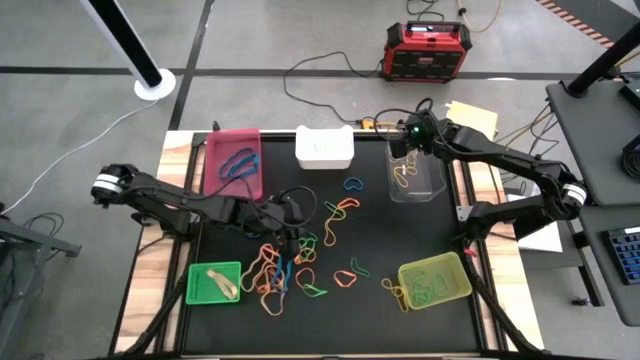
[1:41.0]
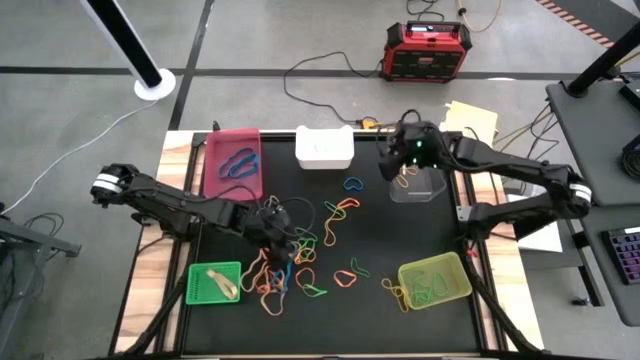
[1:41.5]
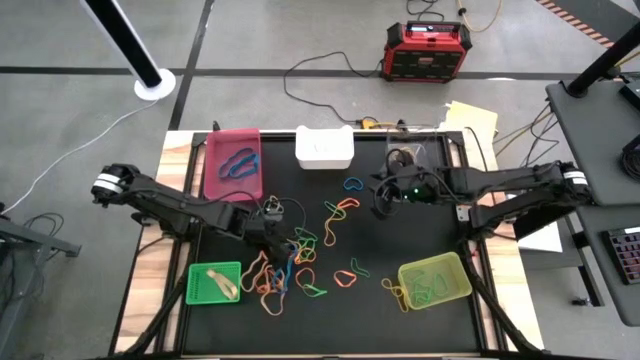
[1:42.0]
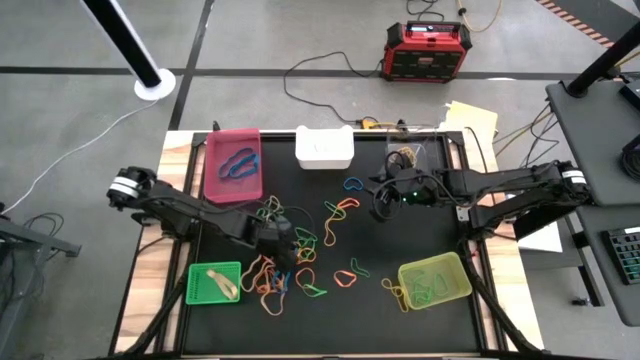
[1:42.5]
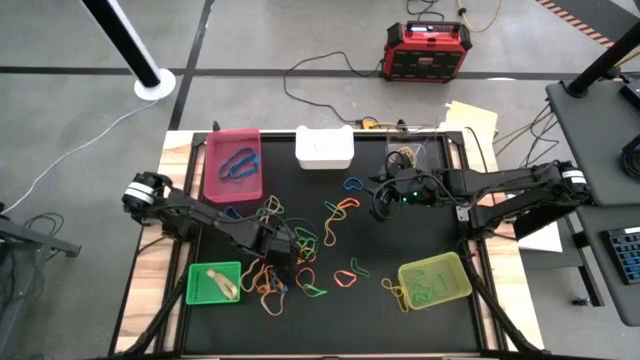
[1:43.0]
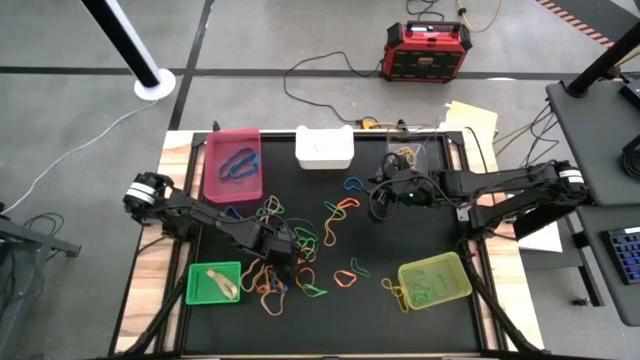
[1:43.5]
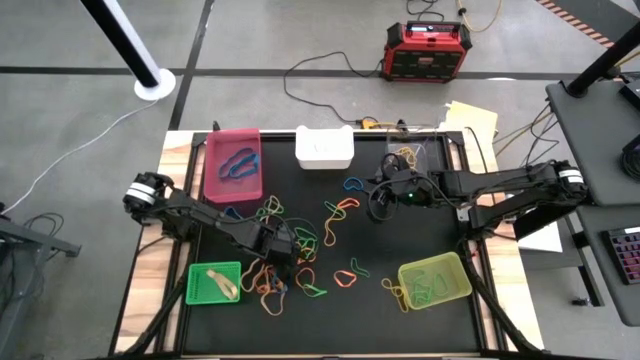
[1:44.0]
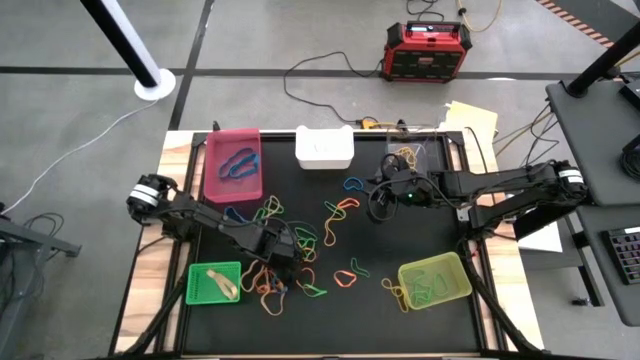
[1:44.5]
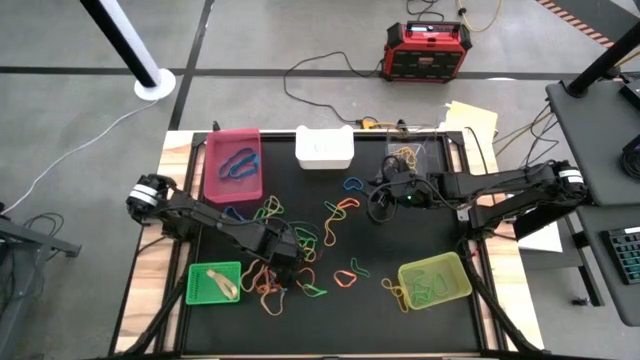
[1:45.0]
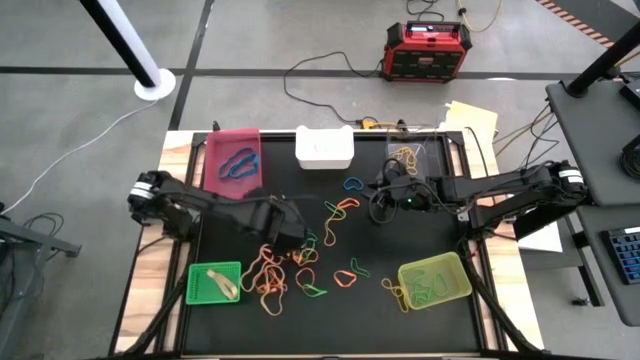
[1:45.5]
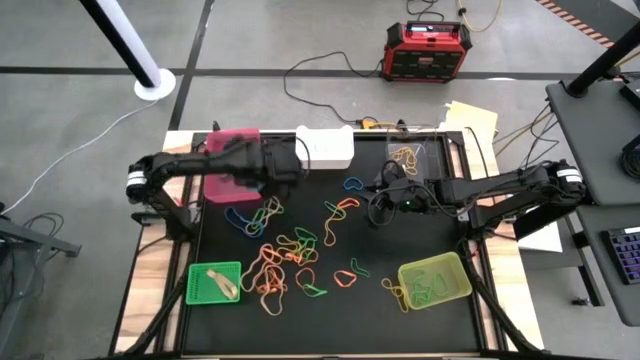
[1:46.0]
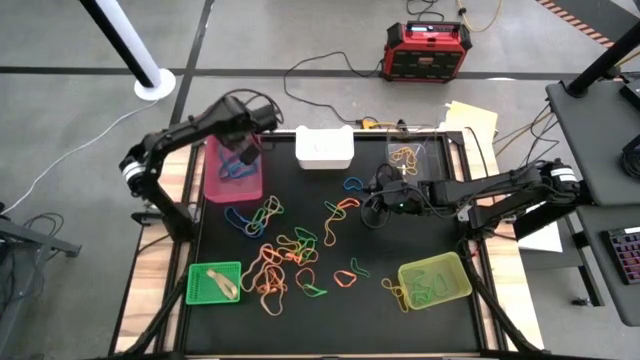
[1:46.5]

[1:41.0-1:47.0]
Task: Sort rubber bands into baskets
Put the blue rubber band into the pink bin

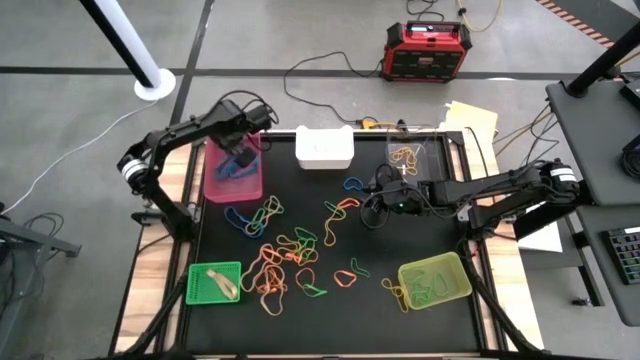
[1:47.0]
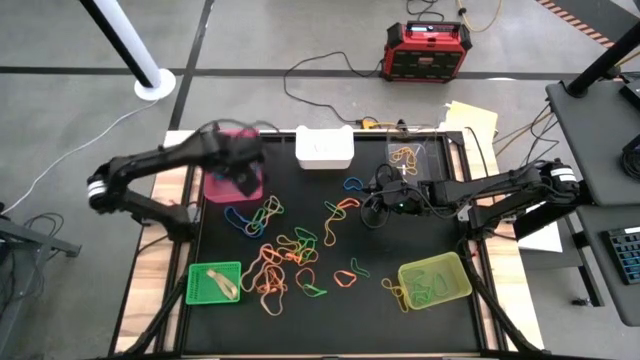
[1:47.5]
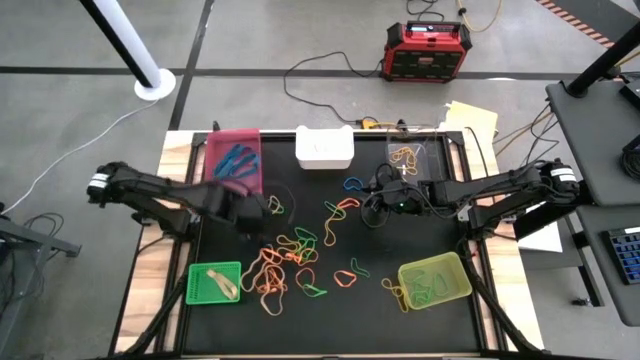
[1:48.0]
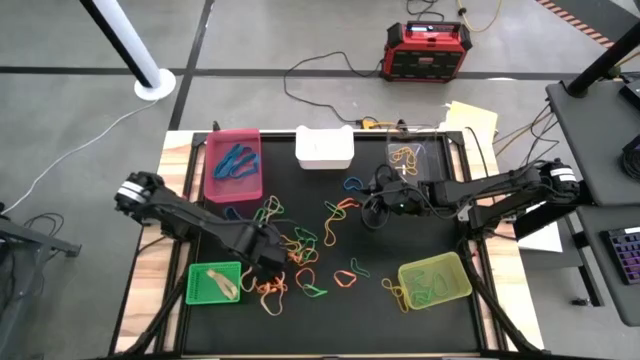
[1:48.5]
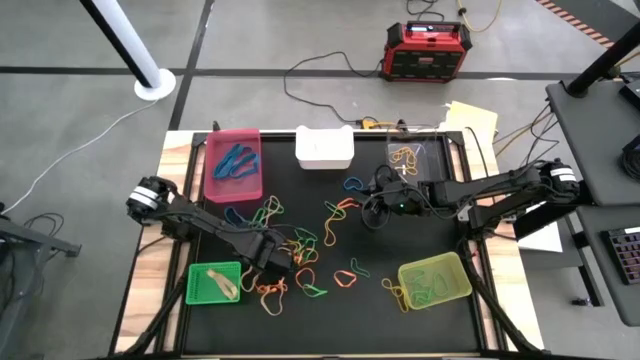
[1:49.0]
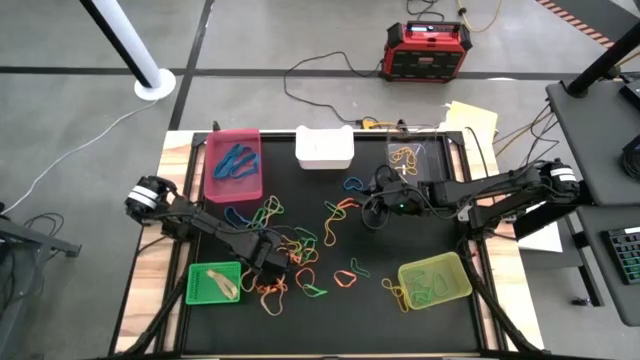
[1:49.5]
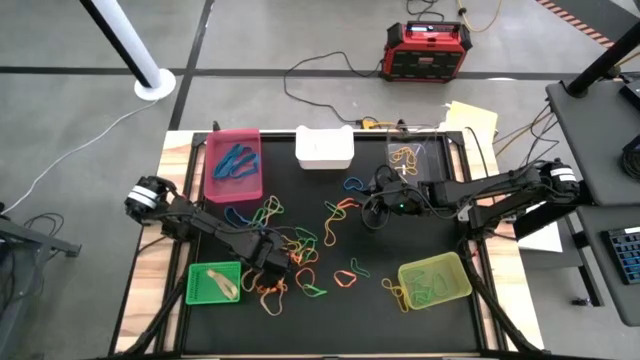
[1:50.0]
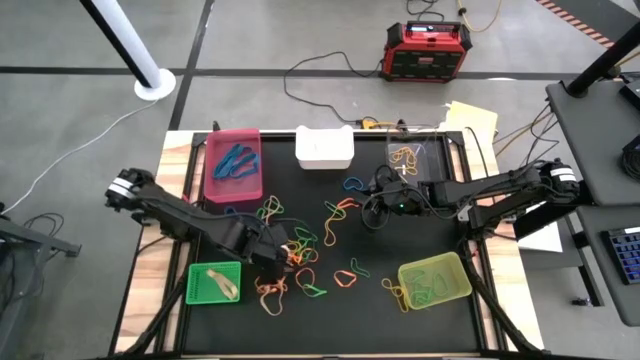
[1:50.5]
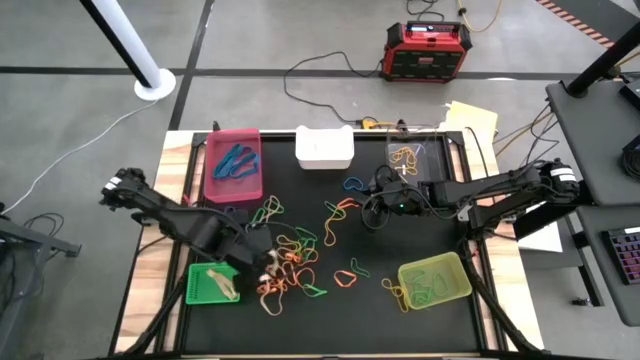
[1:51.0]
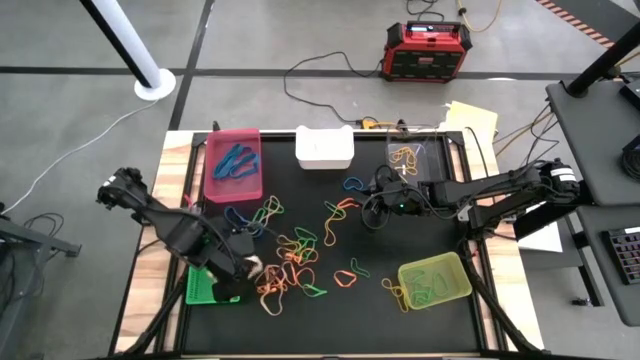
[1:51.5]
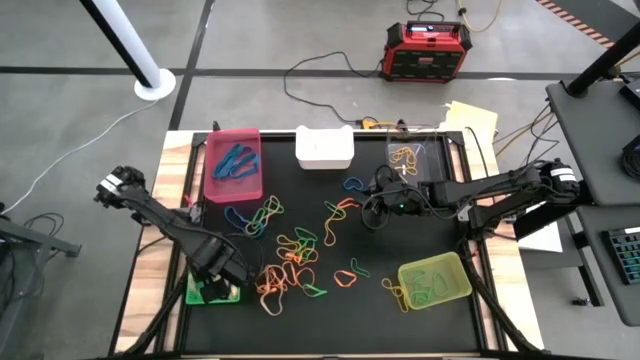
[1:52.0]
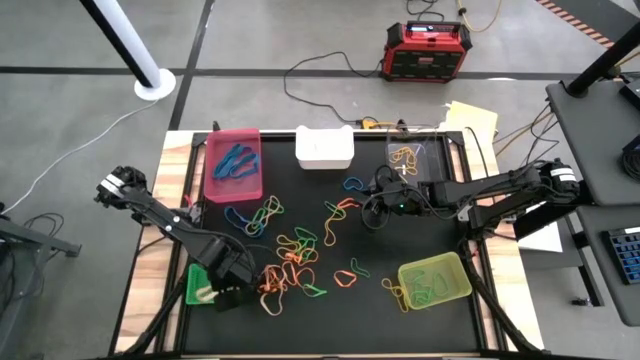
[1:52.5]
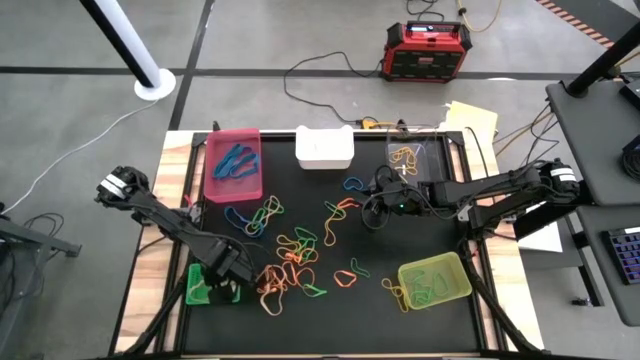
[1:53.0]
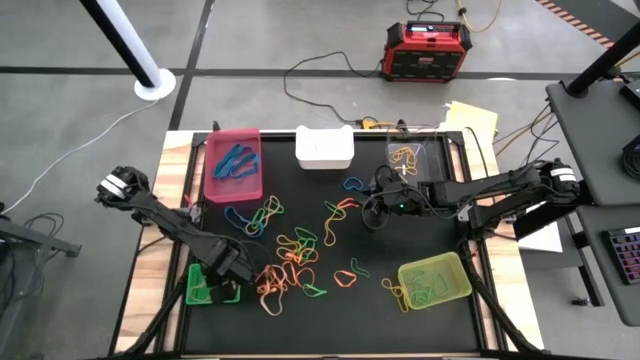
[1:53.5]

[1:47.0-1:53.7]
Put the light yellow rubber band into the green bin

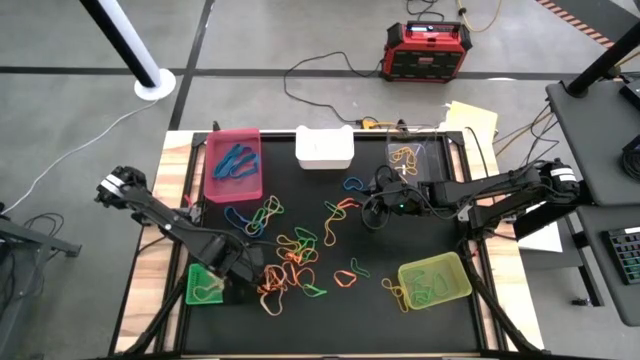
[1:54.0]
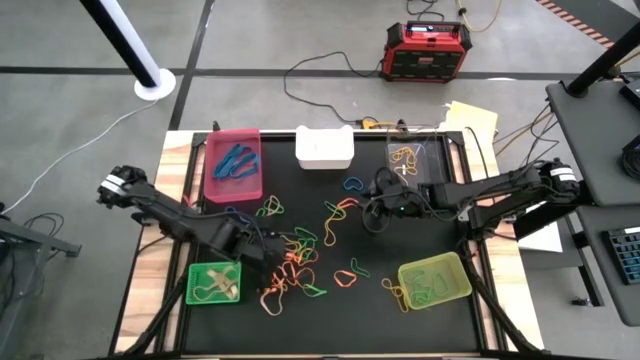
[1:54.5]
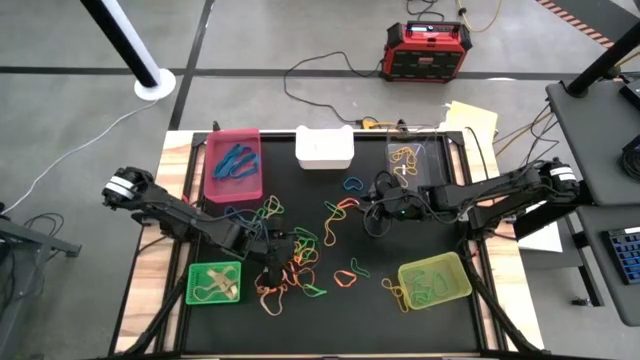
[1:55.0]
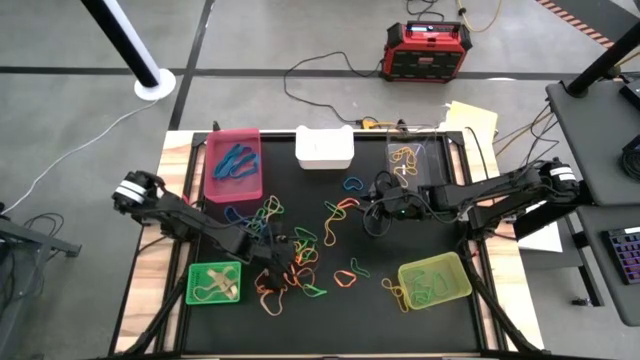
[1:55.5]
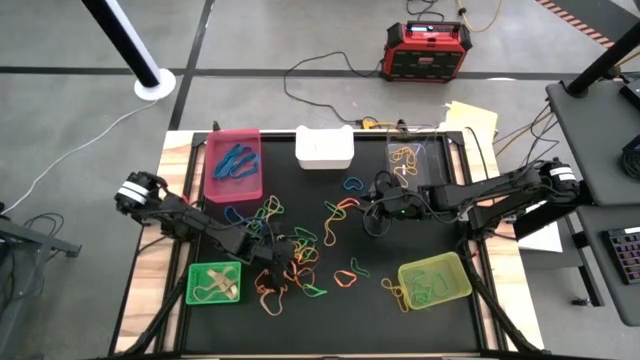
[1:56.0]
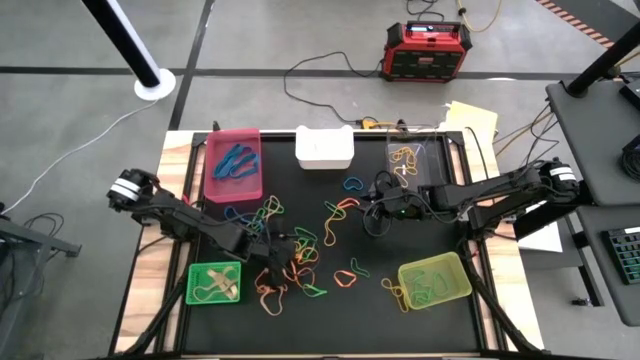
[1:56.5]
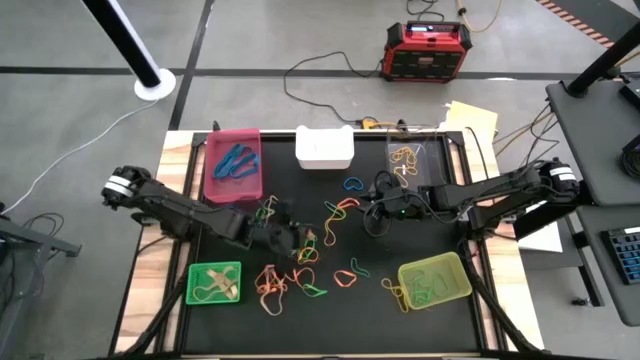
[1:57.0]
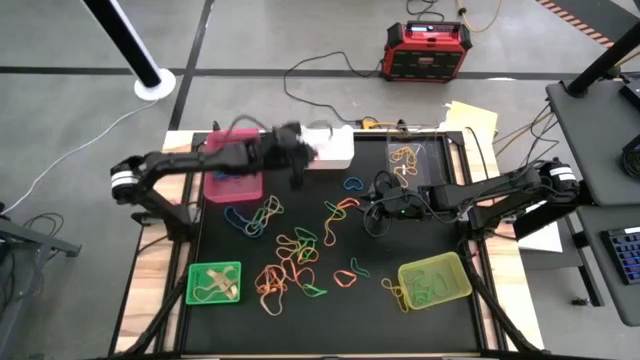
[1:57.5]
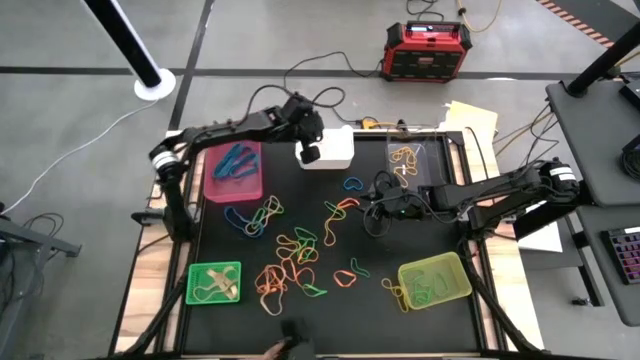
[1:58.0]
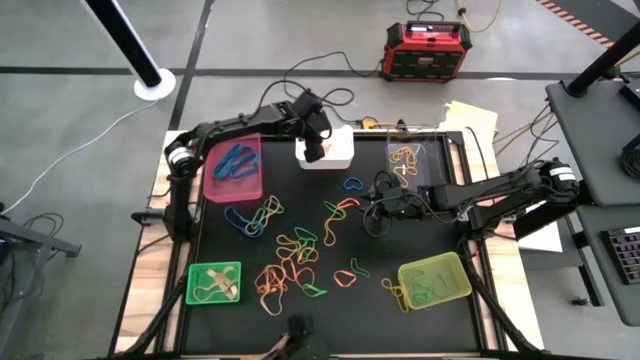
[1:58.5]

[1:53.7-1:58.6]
Put the orange rubber band into the white bin

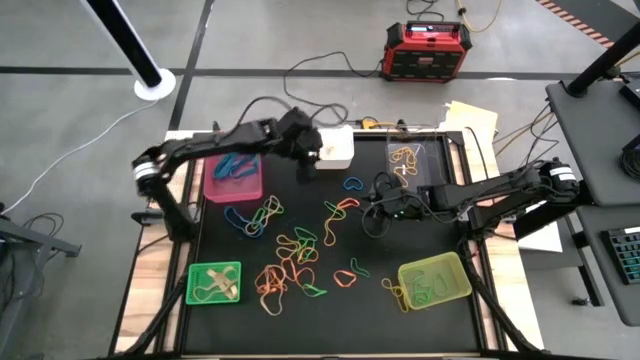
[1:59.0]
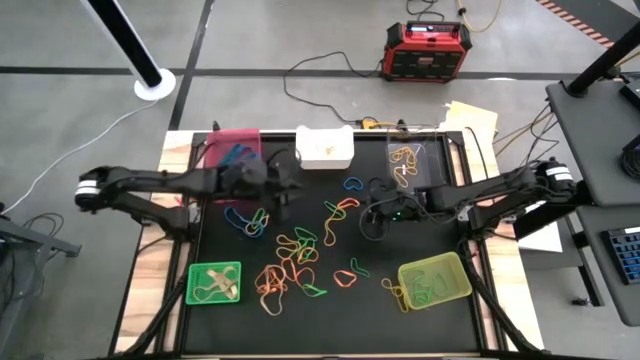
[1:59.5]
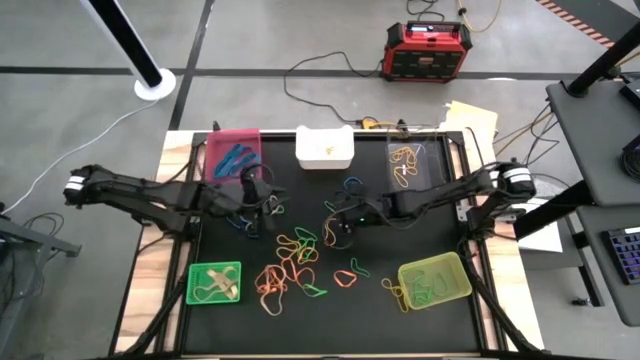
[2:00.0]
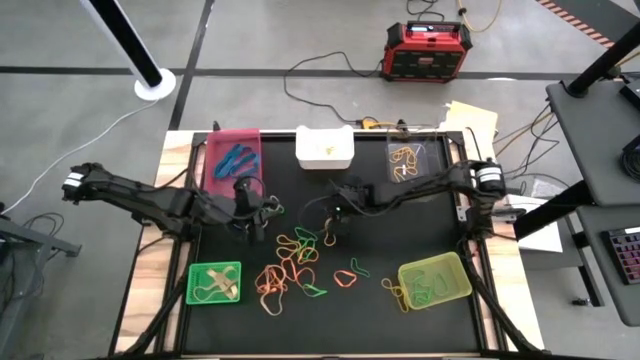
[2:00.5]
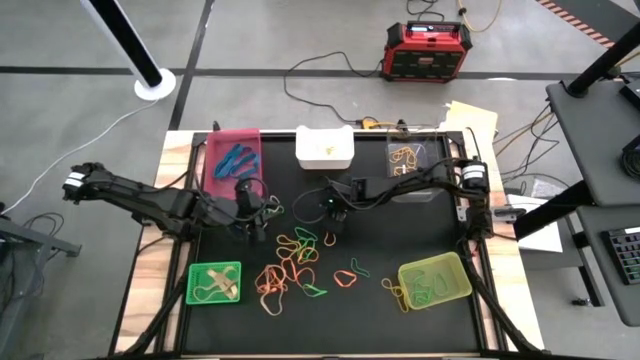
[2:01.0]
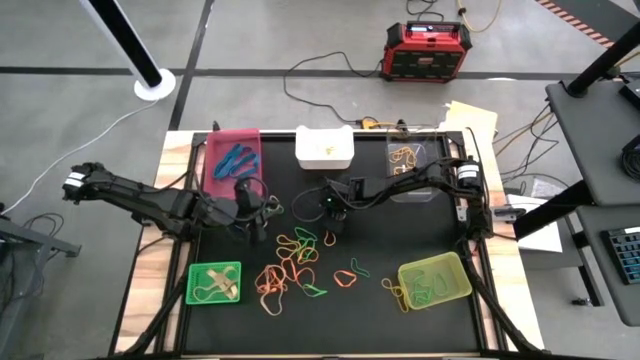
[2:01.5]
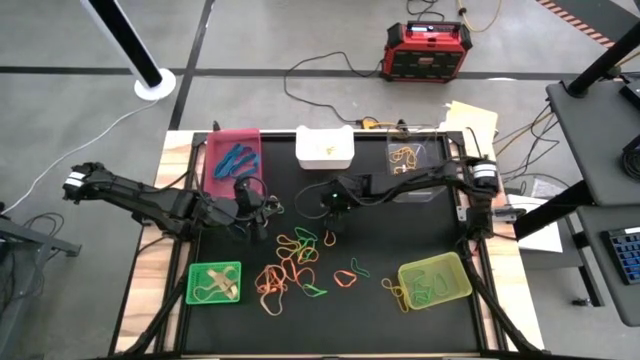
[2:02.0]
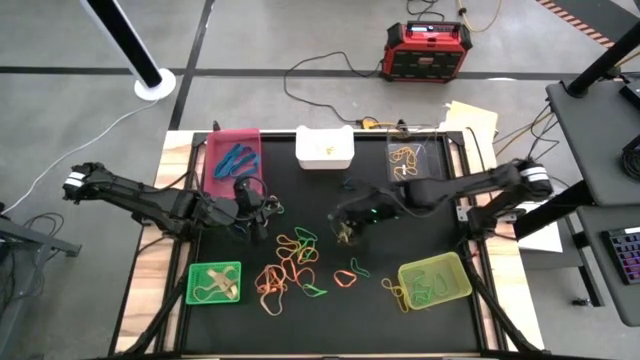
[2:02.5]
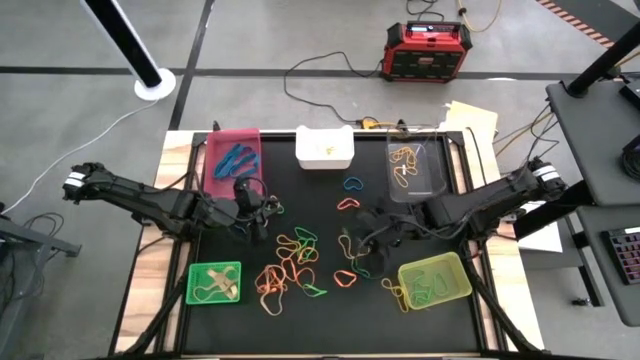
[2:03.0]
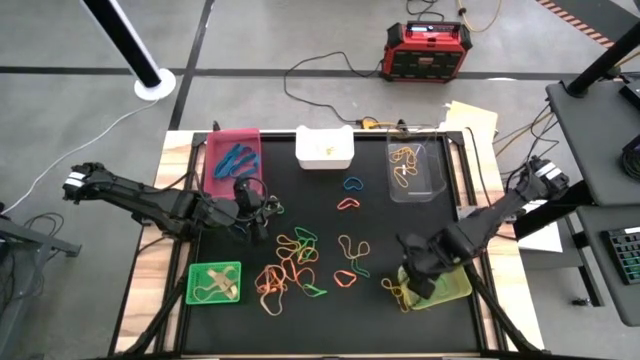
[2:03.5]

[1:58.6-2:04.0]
Put the green rubber band into the yellow bin
